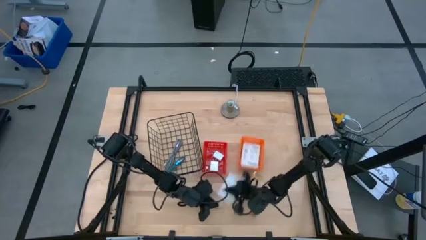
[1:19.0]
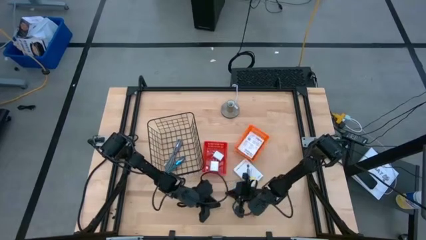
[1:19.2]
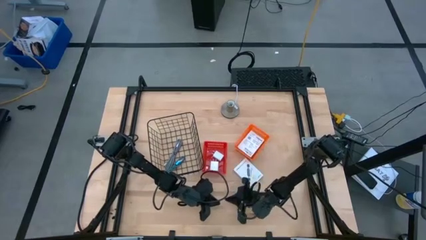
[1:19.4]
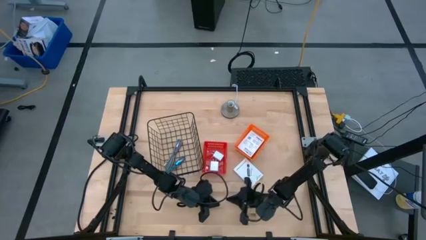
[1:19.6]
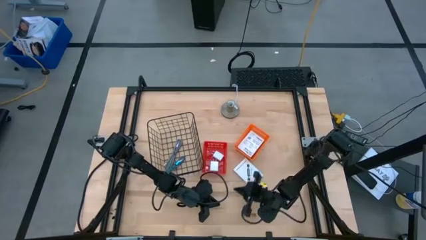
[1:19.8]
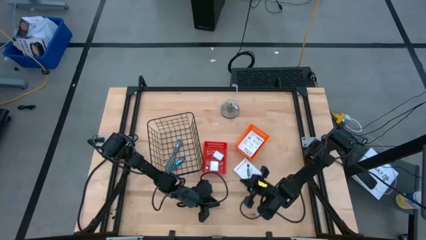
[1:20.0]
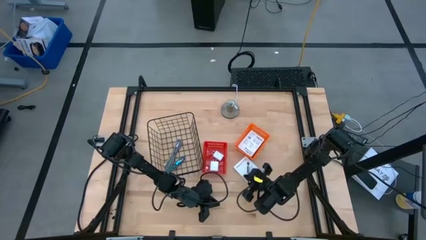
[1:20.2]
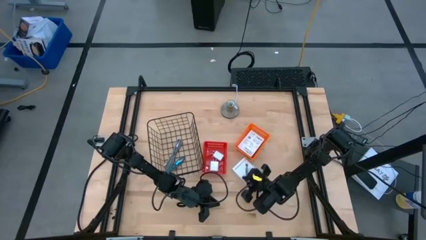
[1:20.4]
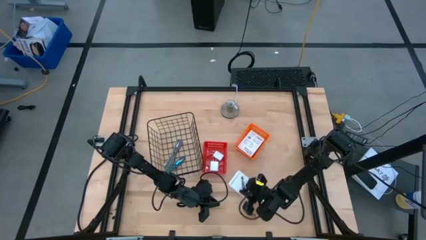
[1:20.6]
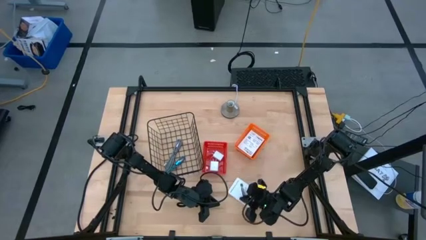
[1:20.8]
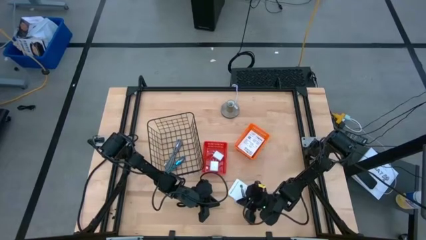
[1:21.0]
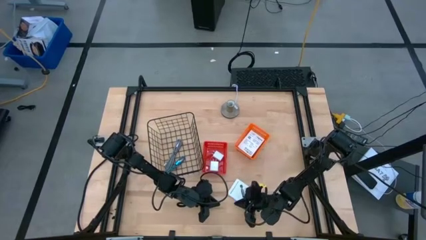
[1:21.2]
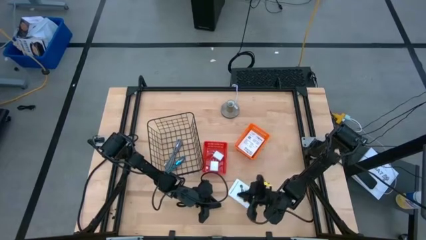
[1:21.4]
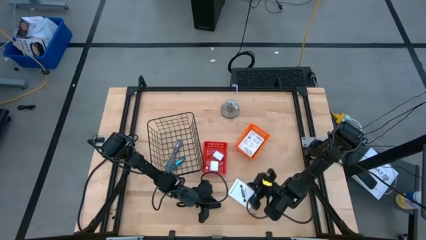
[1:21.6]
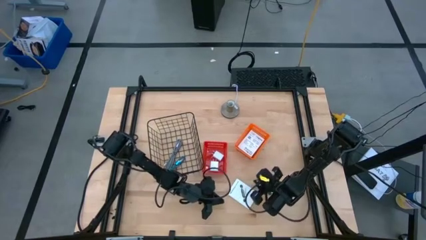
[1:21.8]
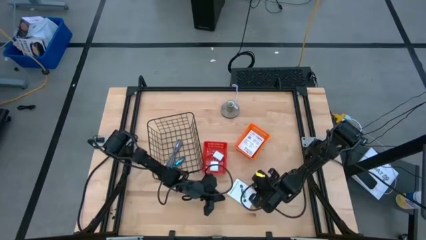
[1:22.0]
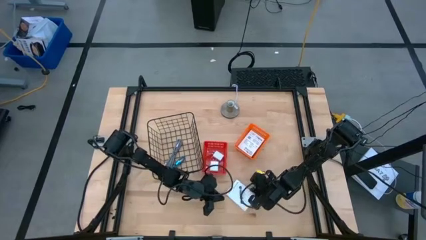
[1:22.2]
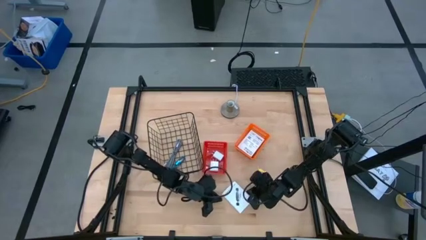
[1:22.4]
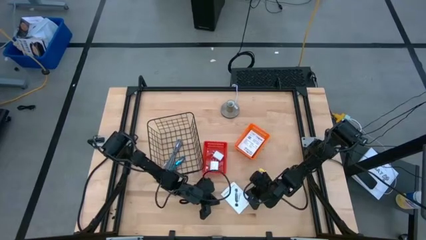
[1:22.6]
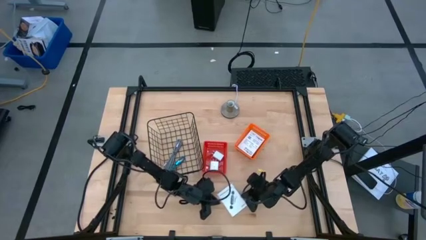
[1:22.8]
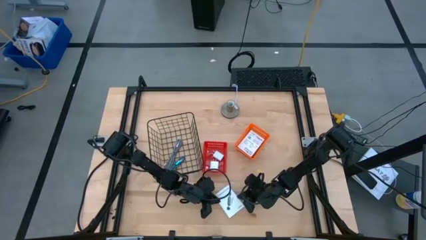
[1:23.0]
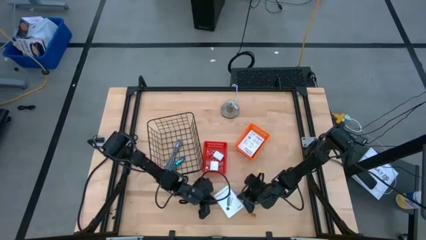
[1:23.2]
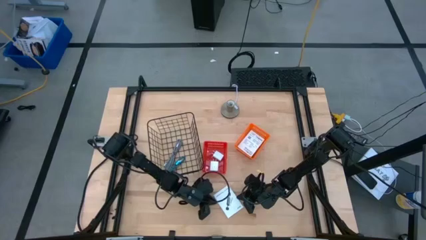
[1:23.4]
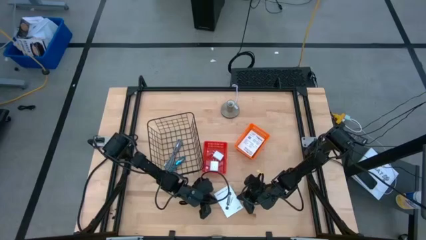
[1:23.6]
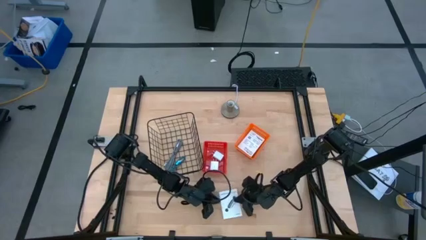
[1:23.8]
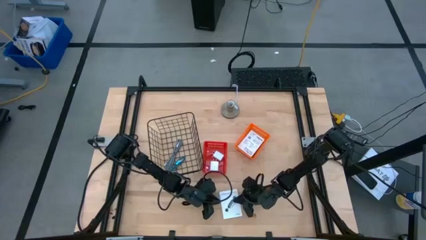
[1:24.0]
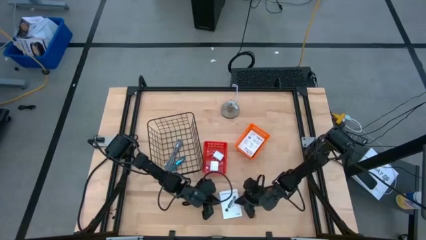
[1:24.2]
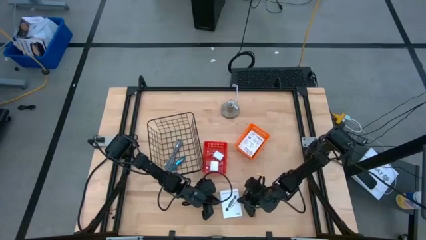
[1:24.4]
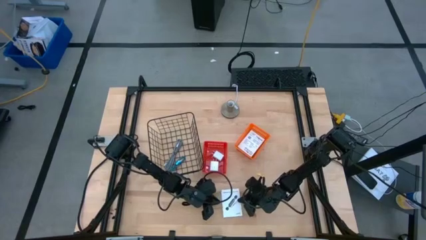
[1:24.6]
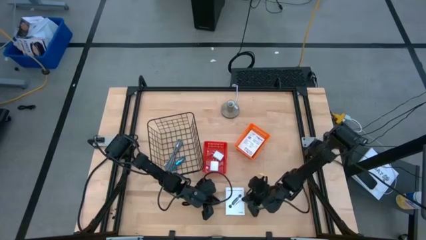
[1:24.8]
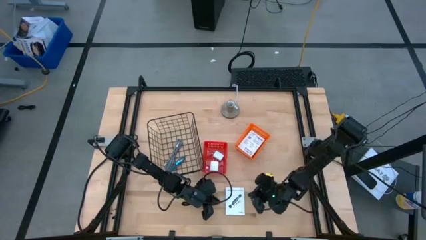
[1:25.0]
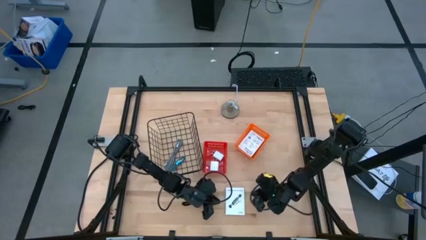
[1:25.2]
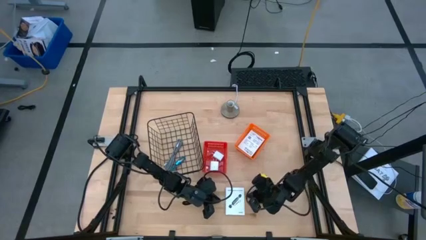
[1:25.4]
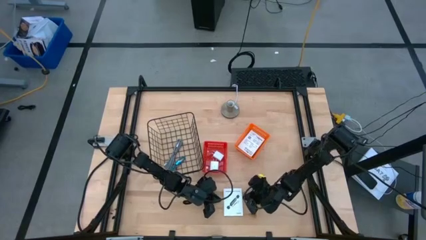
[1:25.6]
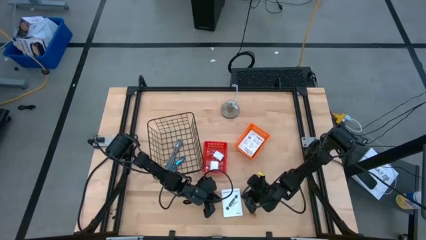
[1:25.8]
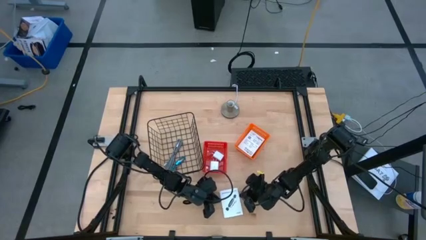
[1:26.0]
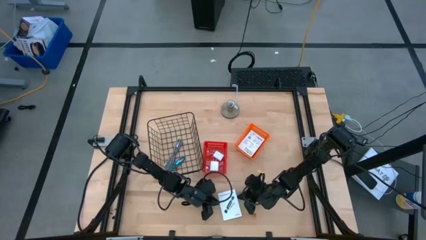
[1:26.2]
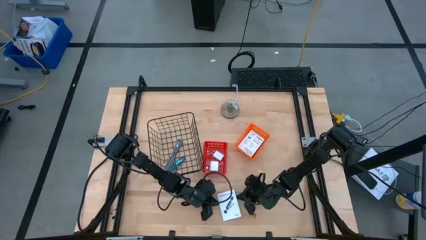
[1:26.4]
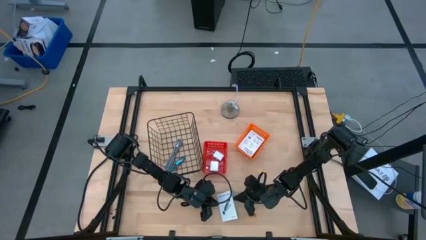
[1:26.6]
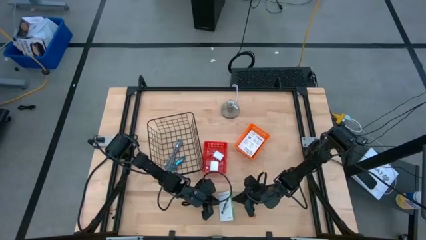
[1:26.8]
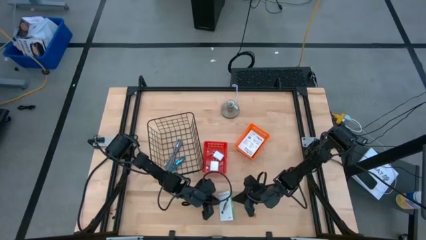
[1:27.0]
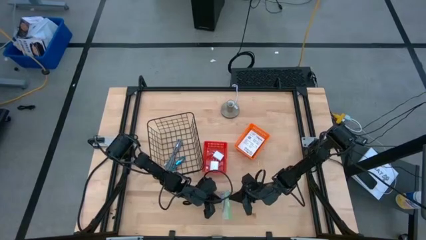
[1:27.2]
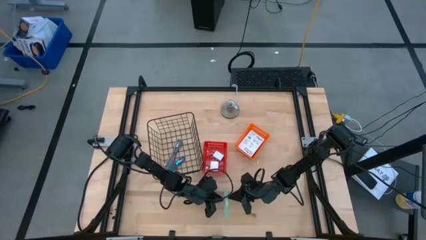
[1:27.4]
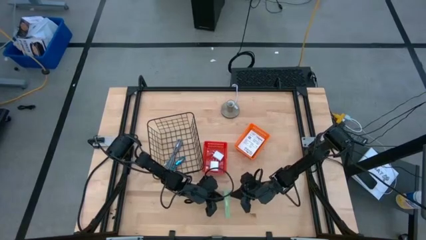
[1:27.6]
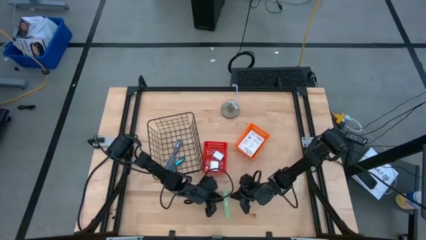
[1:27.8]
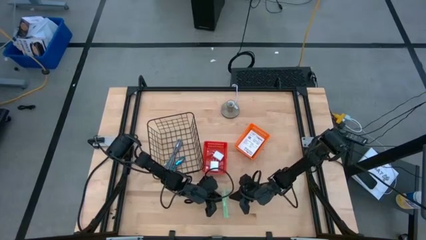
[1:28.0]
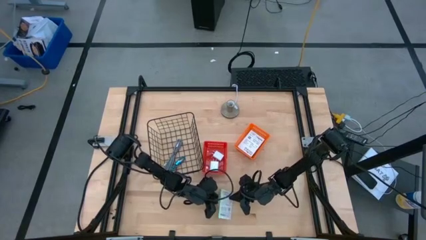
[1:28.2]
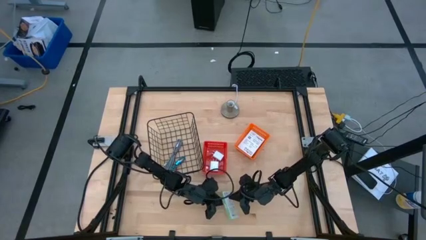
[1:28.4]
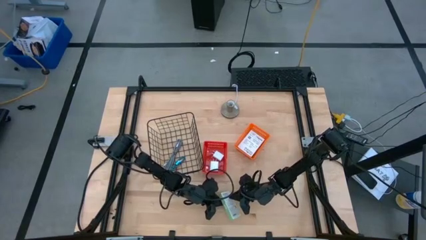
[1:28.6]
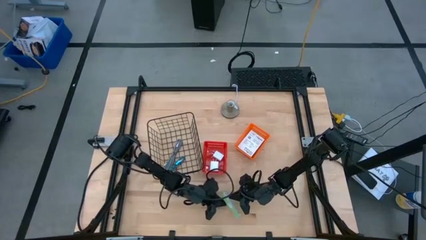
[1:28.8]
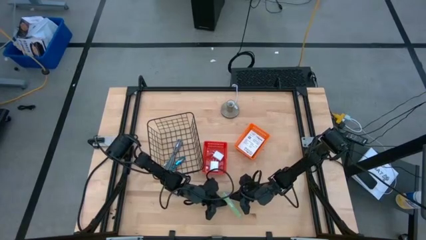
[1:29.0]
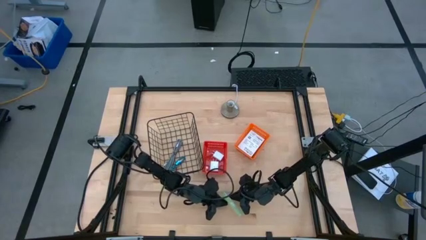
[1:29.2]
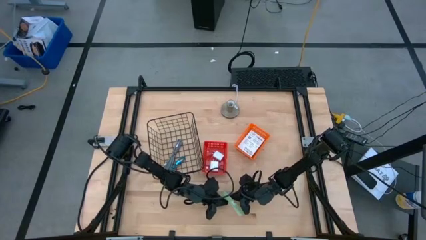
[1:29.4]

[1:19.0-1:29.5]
Task: Pick and place items into bin
Put the card reader box into the orange basket
